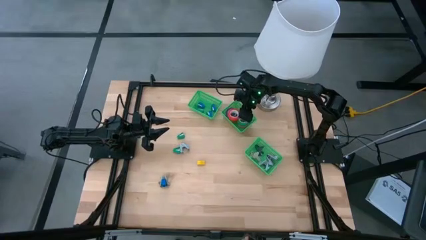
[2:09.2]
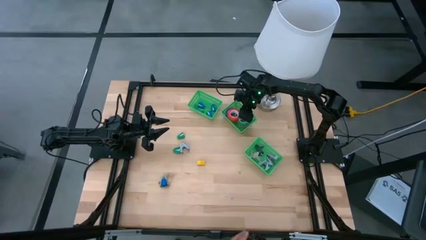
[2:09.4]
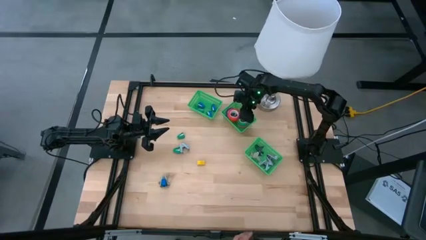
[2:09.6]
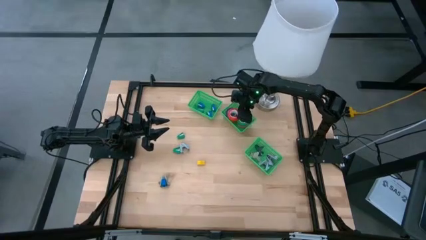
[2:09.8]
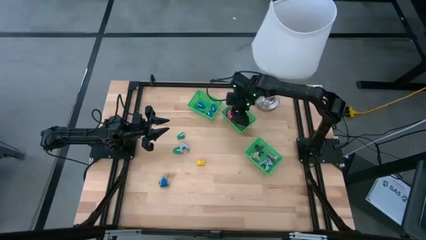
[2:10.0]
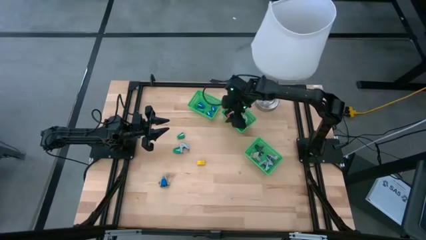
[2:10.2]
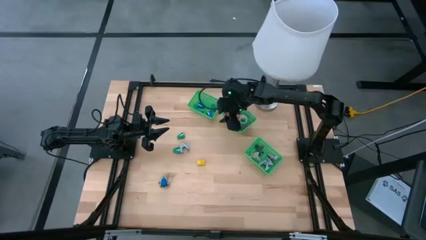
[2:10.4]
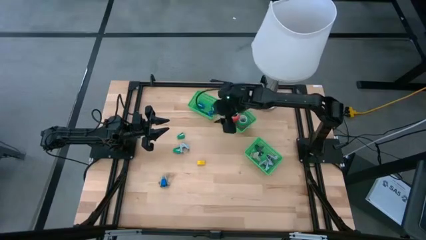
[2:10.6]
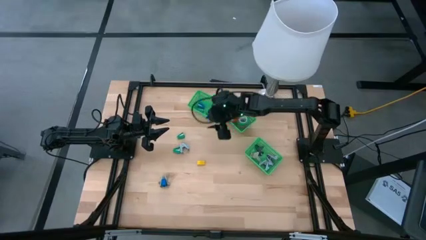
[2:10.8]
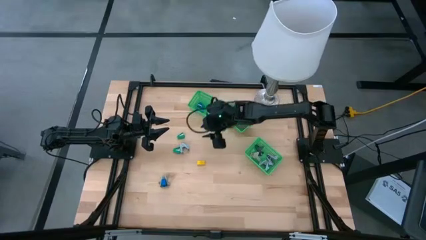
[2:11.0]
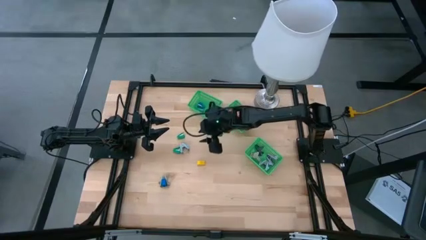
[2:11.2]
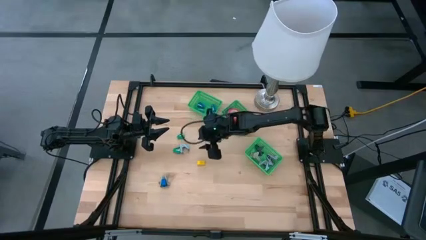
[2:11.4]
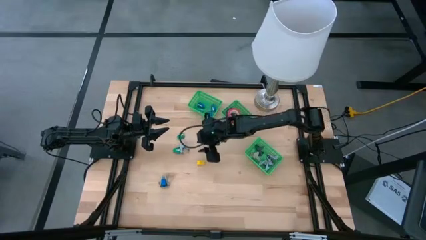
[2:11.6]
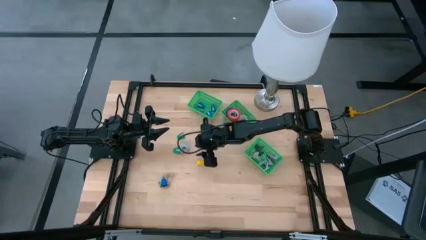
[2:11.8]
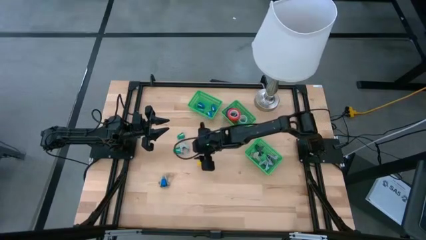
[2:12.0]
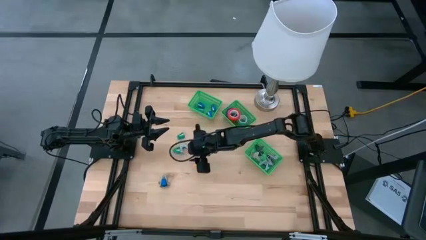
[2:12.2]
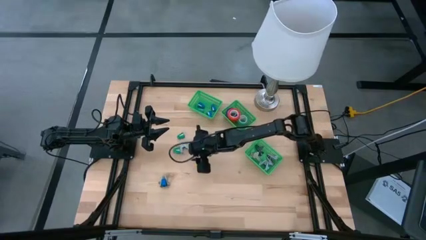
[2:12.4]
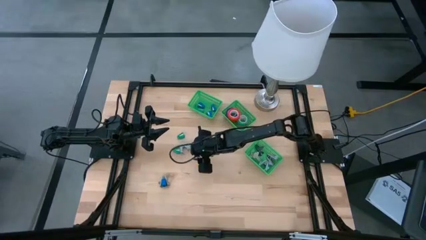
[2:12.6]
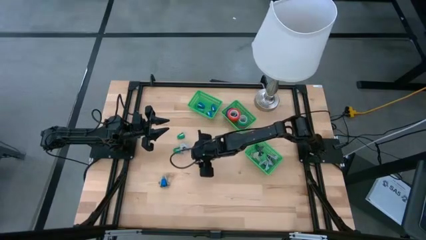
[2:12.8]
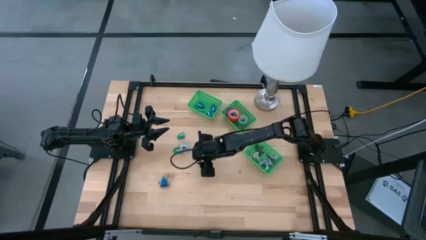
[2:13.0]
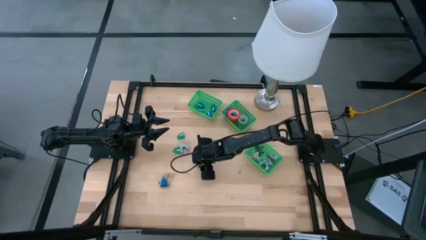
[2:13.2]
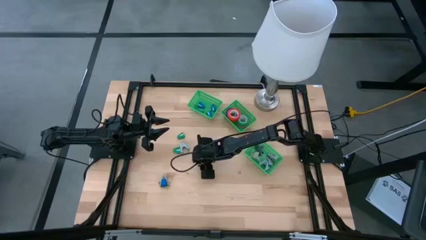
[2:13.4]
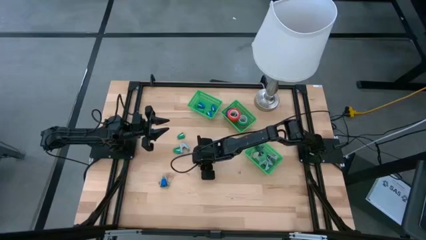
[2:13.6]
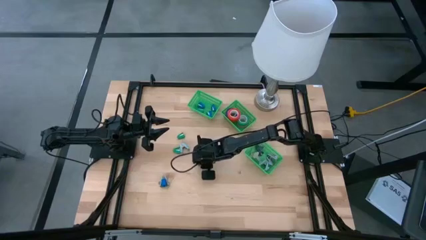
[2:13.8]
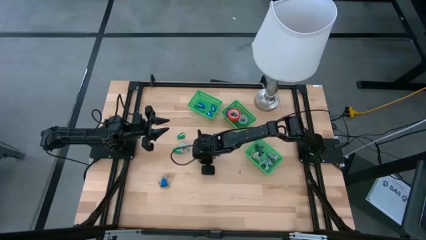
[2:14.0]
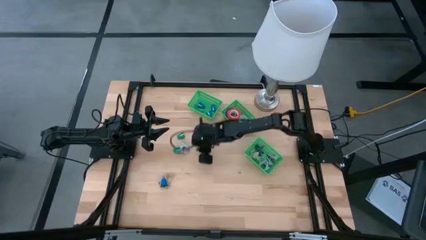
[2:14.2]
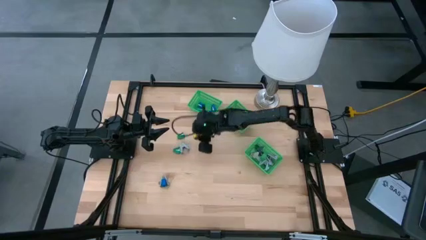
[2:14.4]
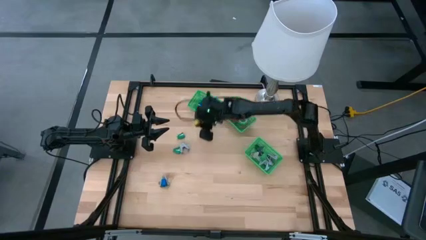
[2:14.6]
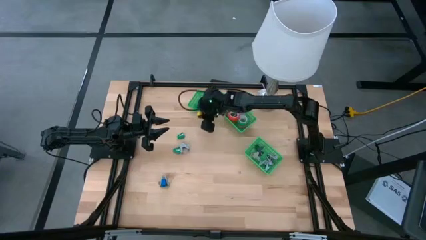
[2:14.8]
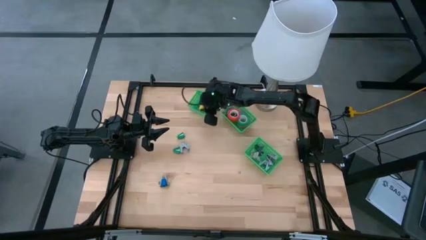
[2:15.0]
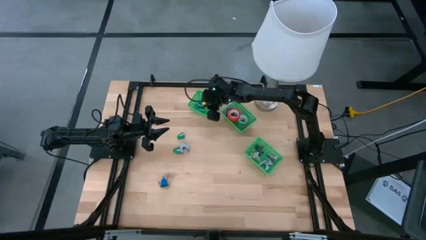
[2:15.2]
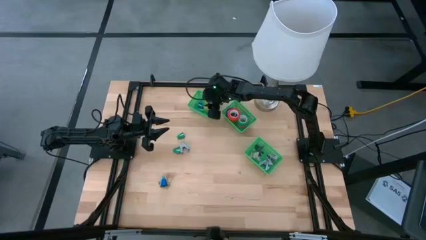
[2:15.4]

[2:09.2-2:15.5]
Task: Pick and place Stapler, Stapler remover, tape
Put the yellow stapler into the top basket

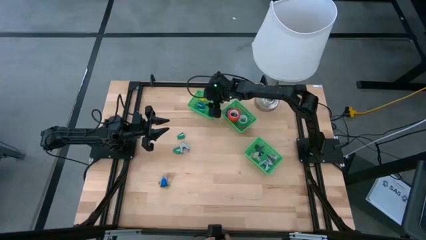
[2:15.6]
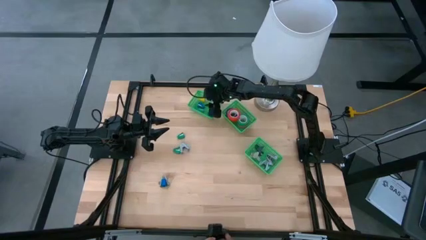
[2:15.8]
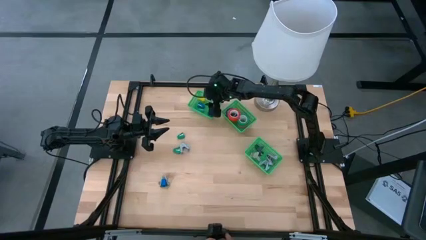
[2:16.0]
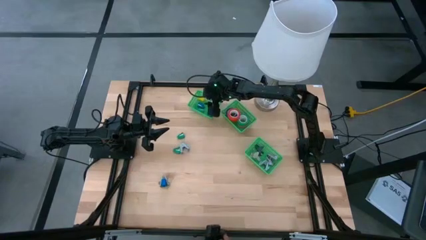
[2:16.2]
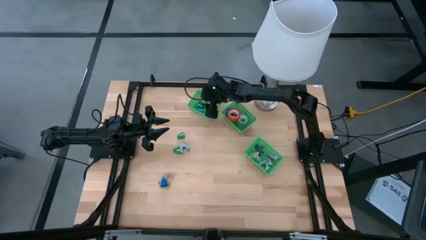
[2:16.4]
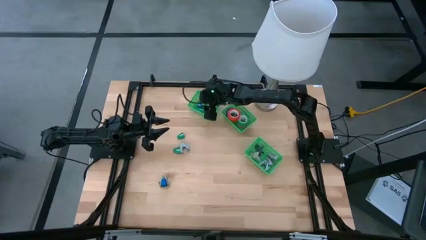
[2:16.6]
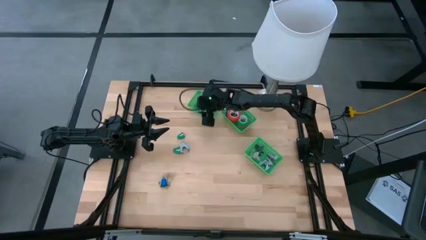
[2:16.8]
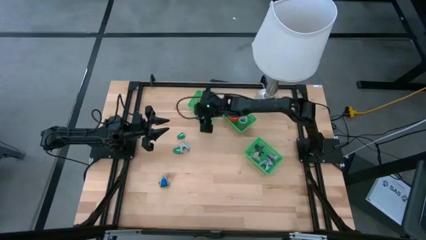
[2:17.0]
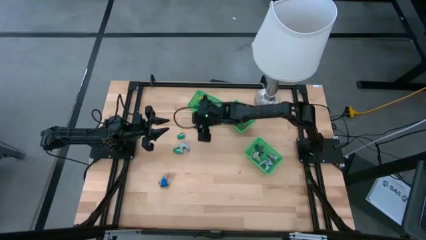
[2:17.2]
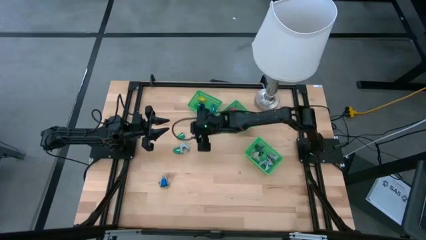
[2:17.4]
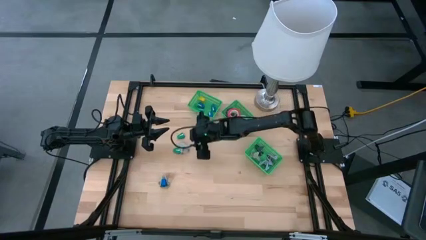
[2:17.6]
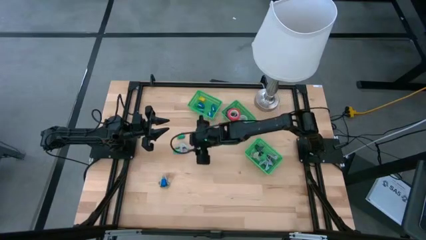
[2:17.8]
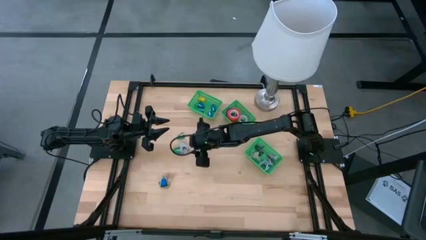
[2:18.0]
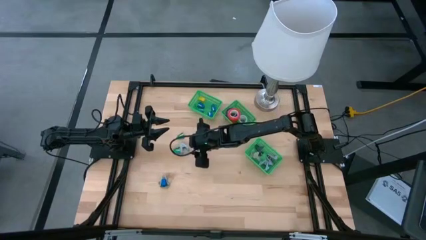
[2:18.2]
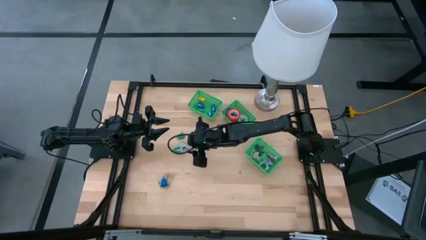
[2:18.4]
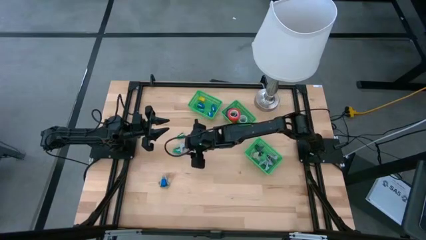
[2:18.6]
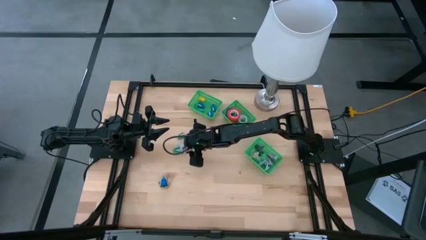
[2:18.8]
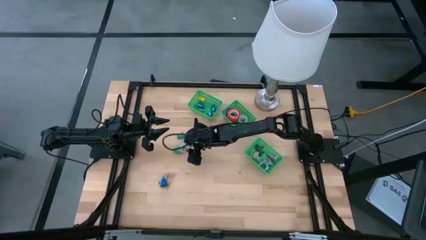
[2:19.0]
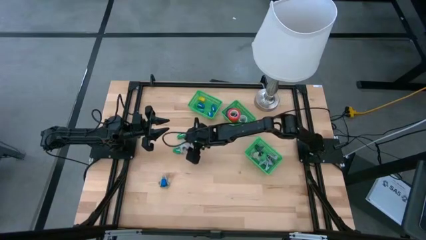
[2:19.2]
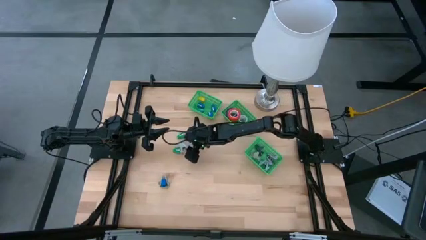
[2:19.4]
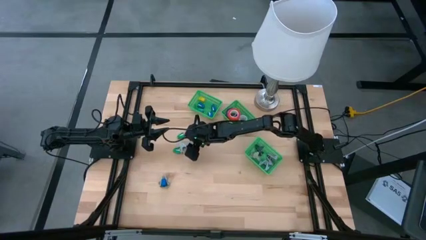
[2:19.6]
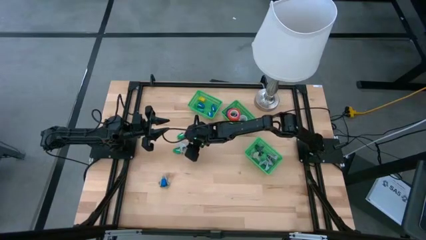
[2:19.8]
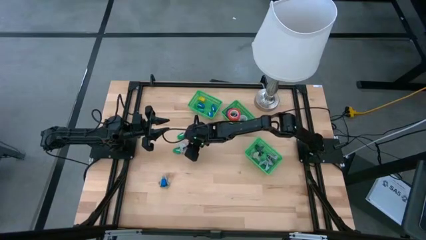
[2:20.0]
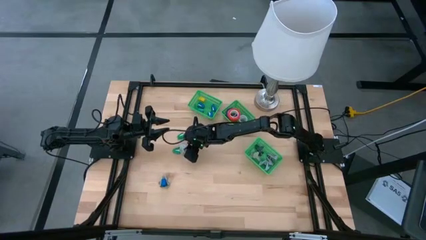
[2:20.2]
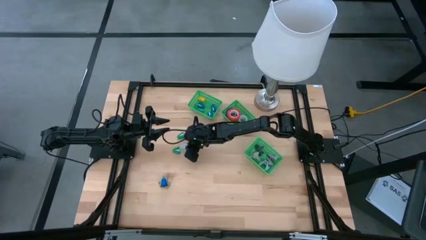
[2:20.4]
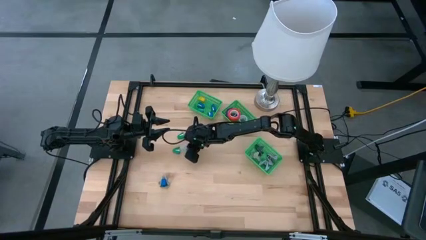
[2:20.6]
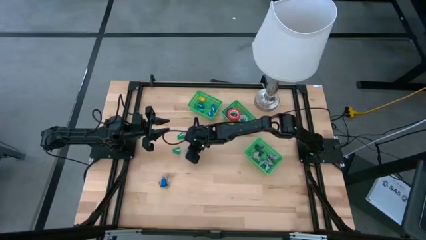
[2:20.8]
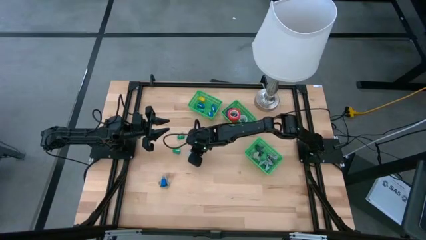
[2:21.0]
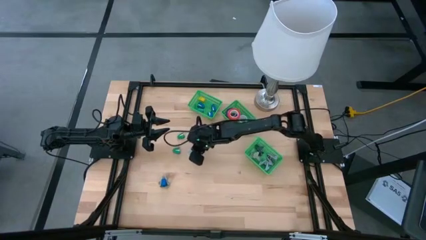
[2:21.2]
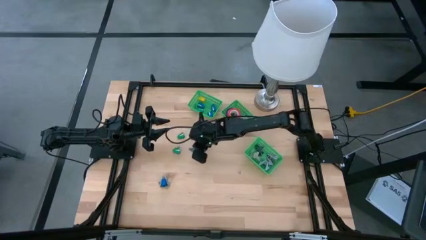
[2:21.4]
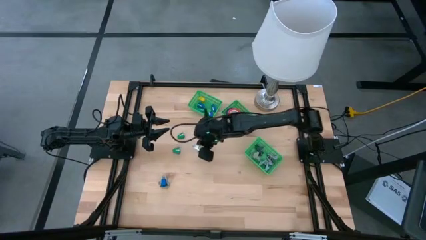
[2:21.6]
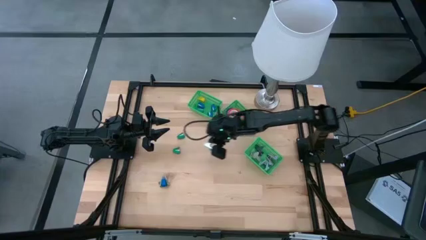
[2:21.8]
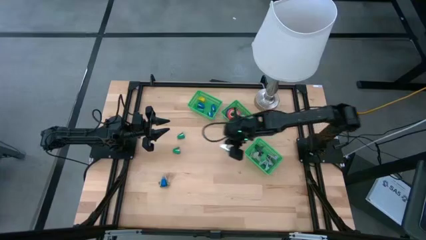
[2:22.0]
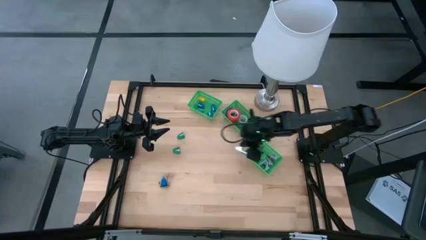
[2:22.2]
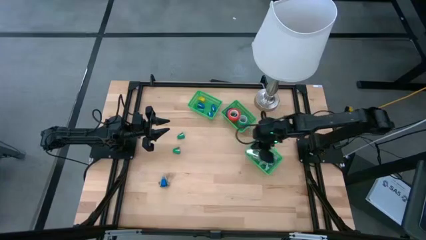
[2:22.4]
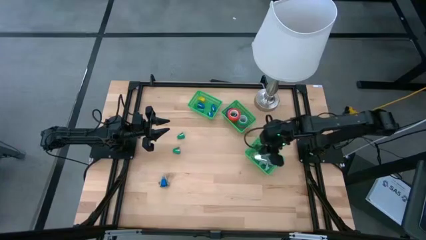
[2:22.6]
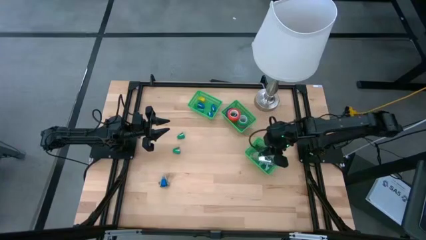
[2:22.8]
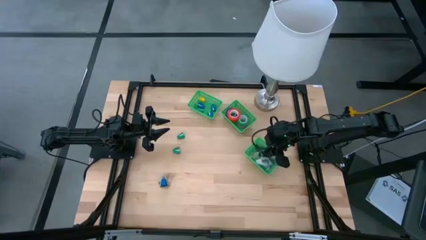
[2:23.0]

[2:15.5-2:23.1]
Put the light blue staple remover into the bottom basket
